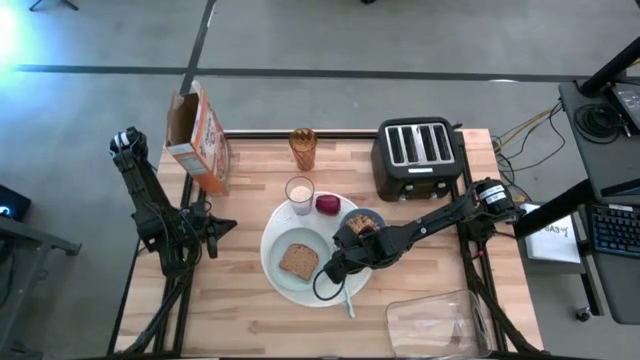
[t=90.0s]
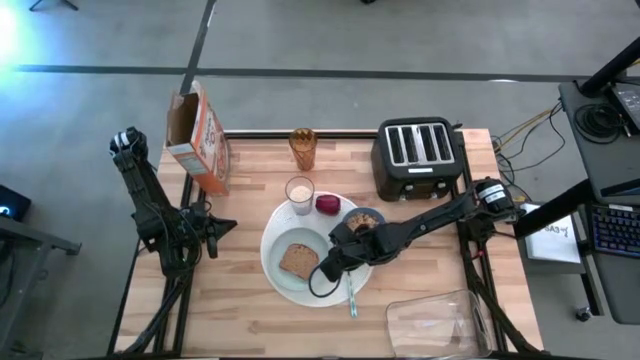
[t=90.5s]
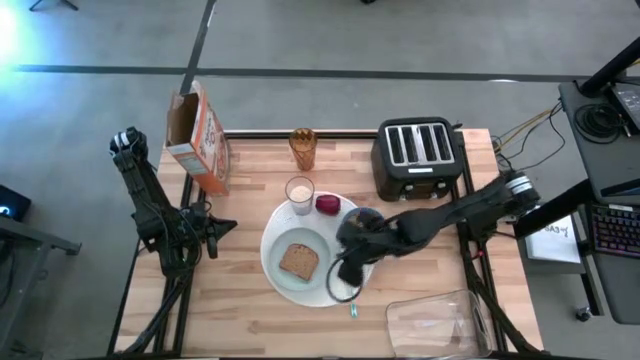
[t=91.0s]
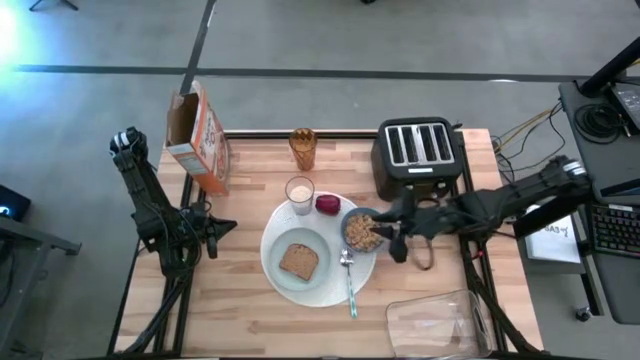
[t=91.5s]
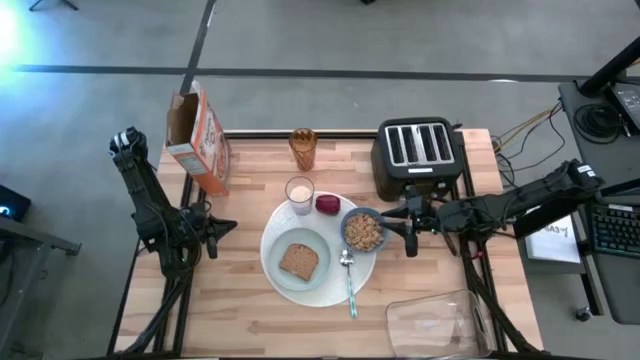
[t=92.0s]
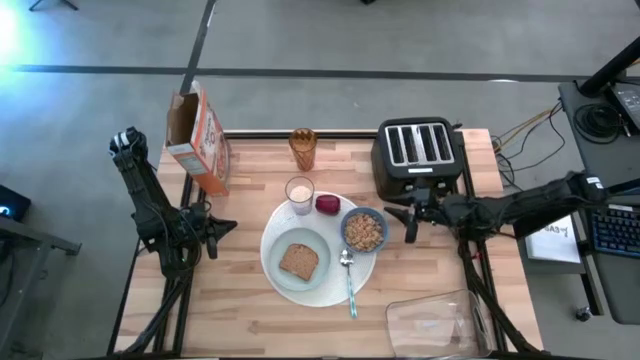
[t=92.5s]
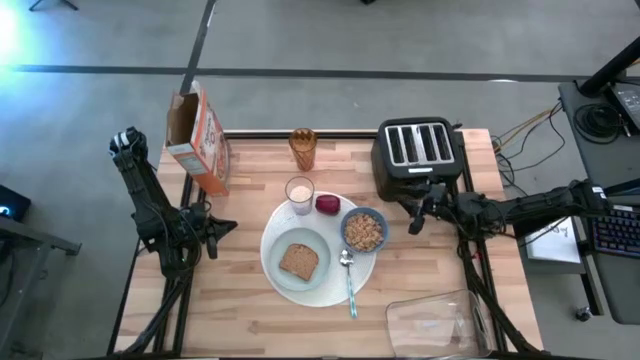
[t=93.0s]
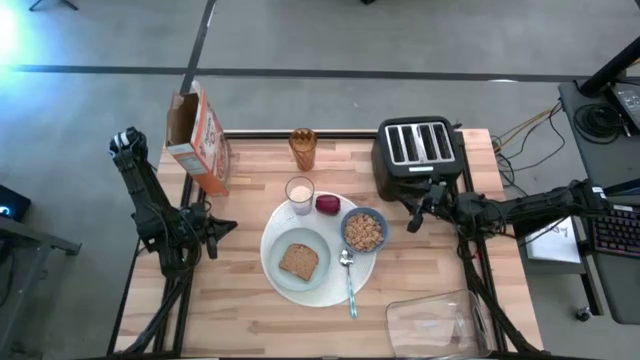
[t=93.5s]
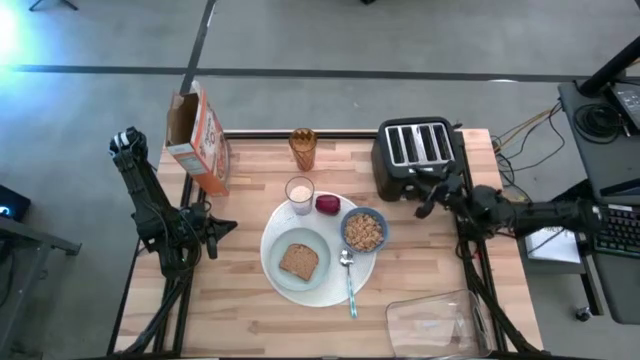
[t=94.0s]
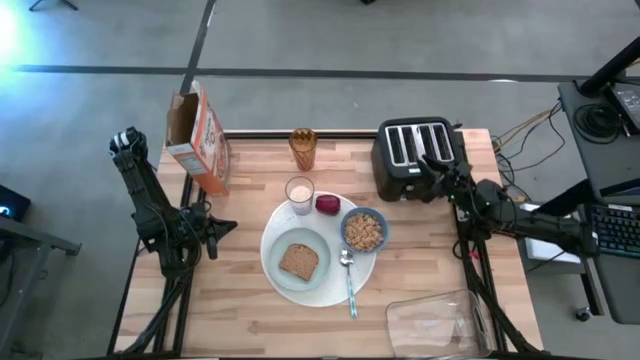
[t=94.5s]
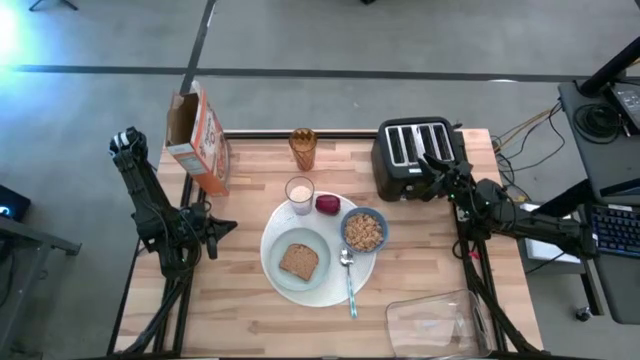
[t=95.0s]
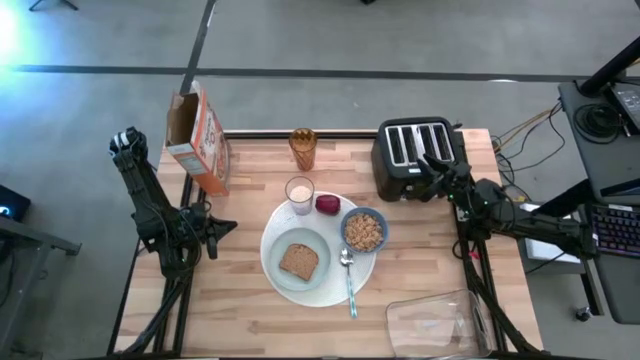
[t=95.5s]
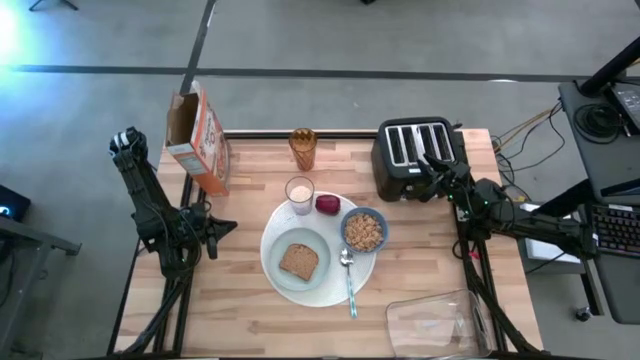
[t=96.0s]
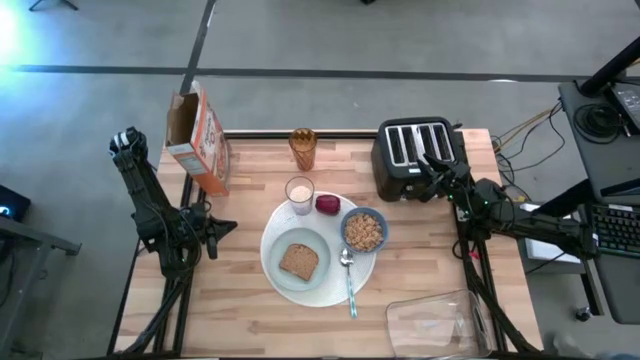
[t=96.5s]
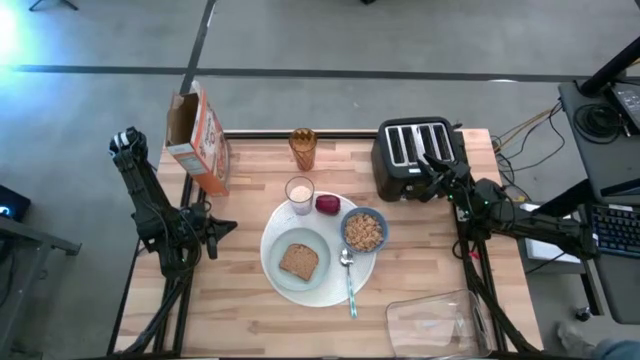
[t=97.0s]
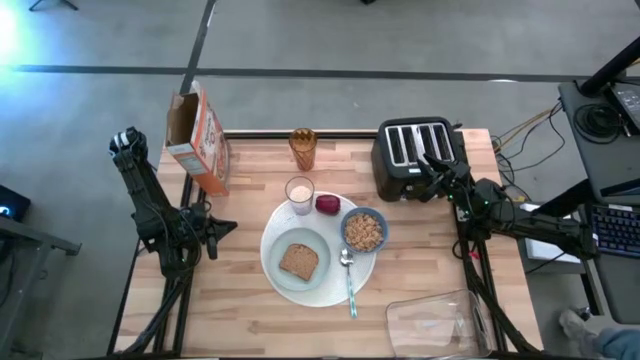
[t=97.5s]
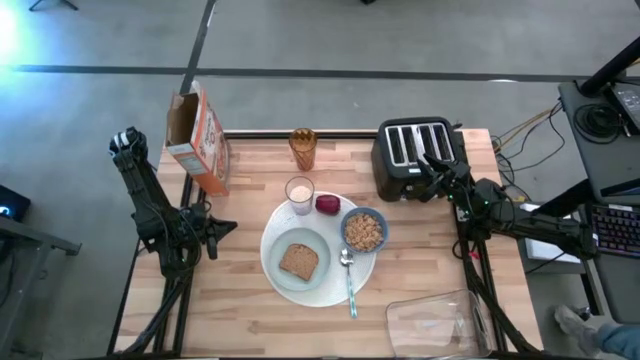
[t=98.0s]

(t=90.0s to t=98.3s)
Task: Arrange a breakfast setting
Return to Home Position

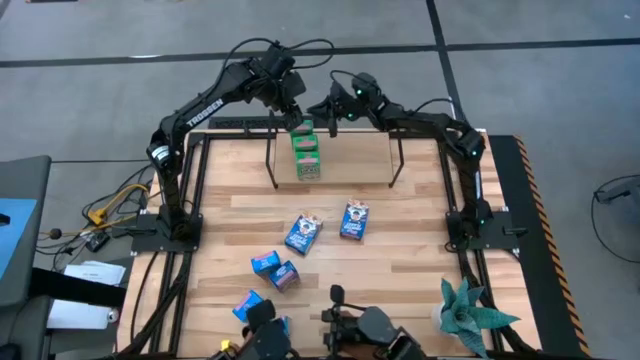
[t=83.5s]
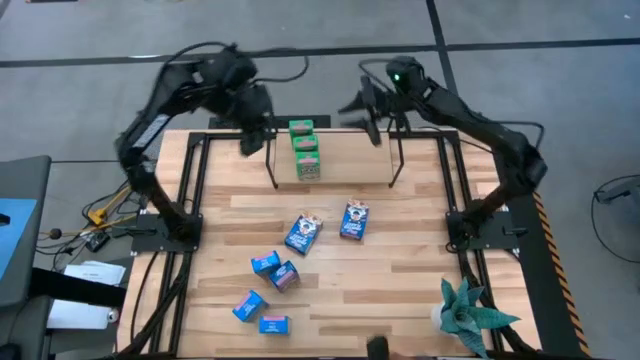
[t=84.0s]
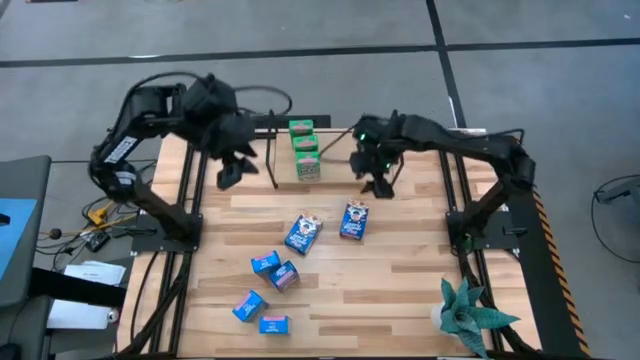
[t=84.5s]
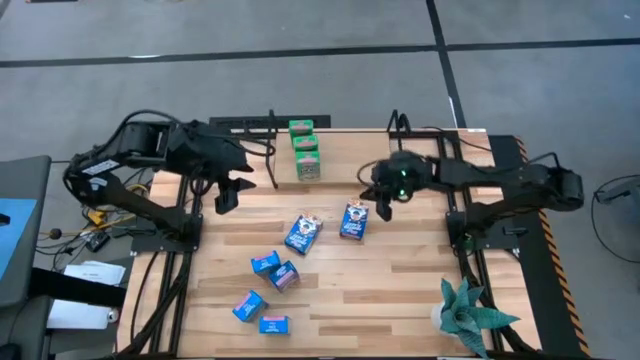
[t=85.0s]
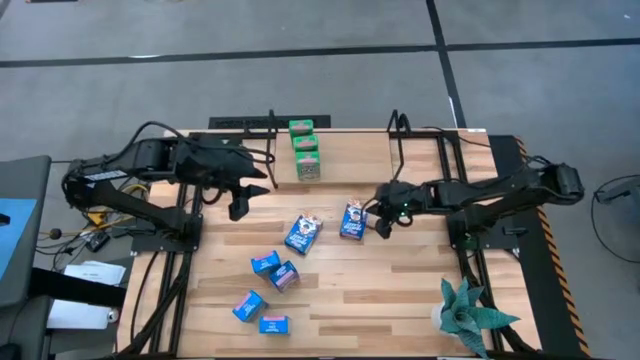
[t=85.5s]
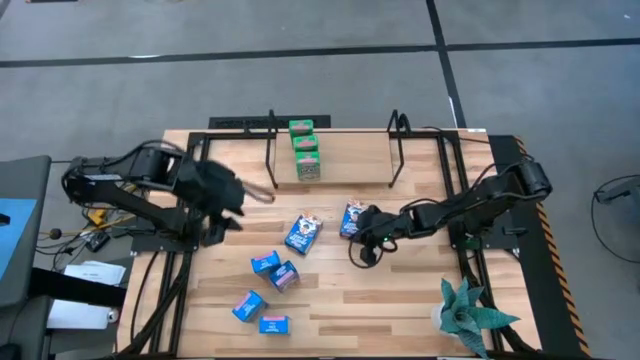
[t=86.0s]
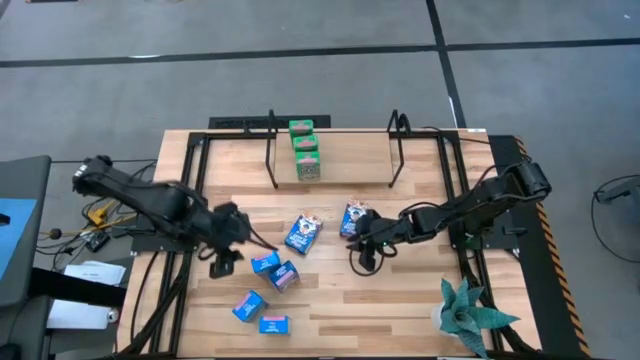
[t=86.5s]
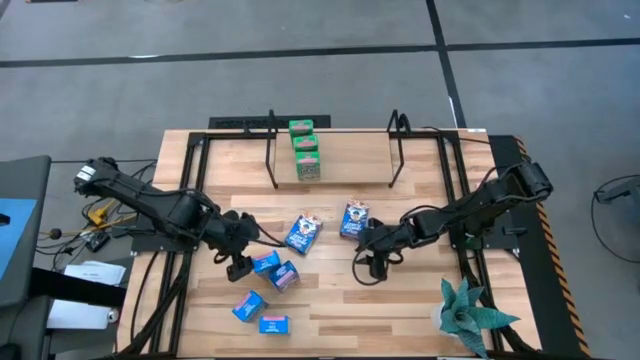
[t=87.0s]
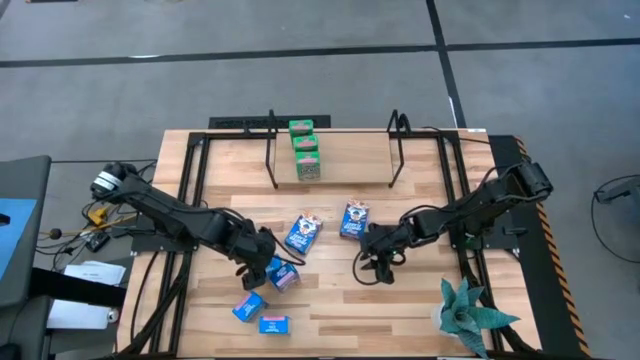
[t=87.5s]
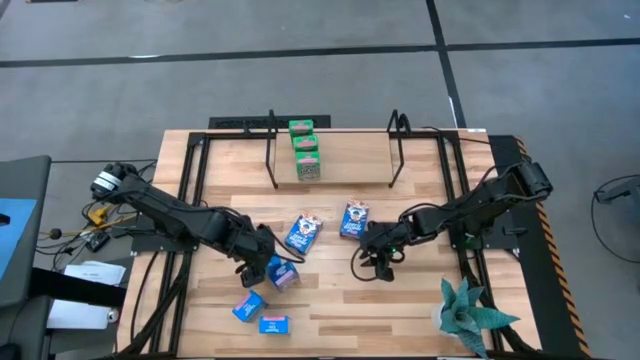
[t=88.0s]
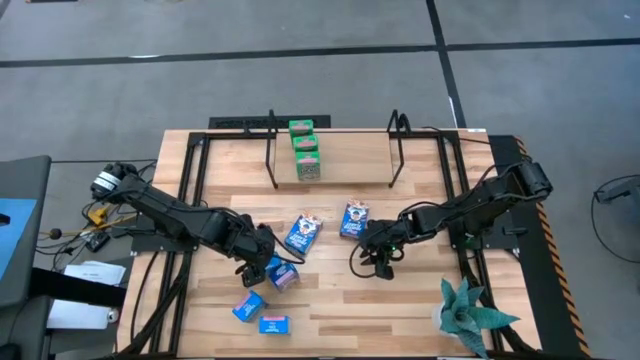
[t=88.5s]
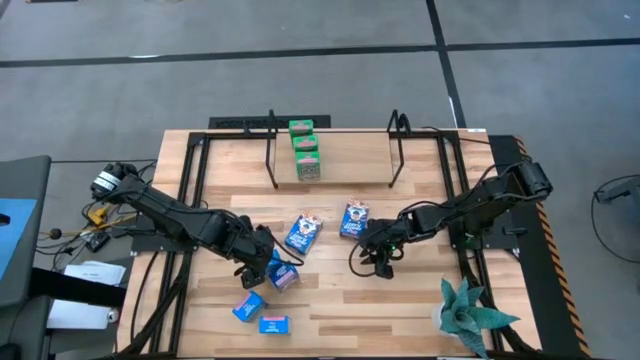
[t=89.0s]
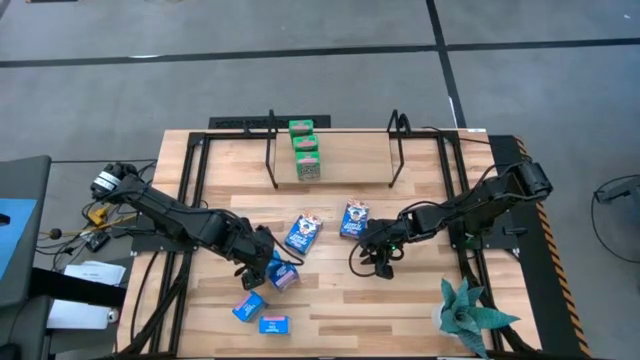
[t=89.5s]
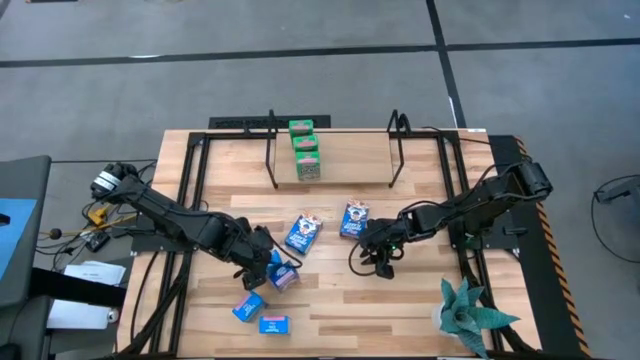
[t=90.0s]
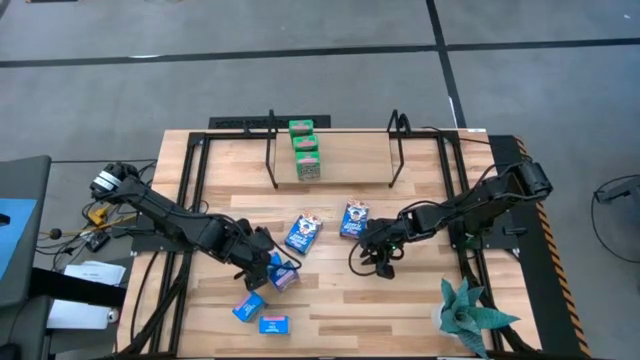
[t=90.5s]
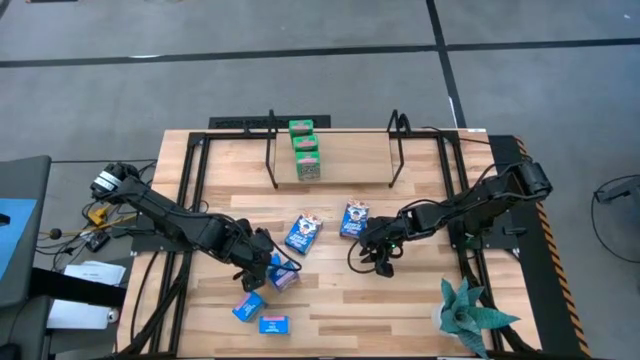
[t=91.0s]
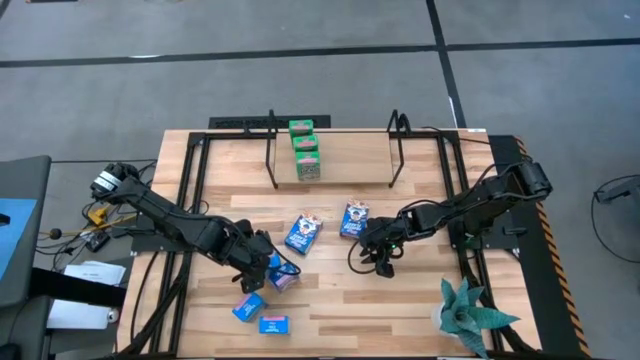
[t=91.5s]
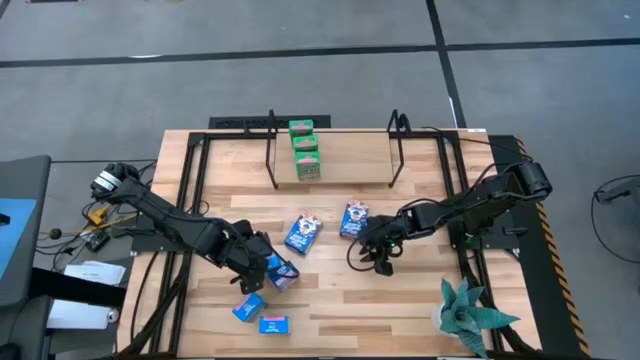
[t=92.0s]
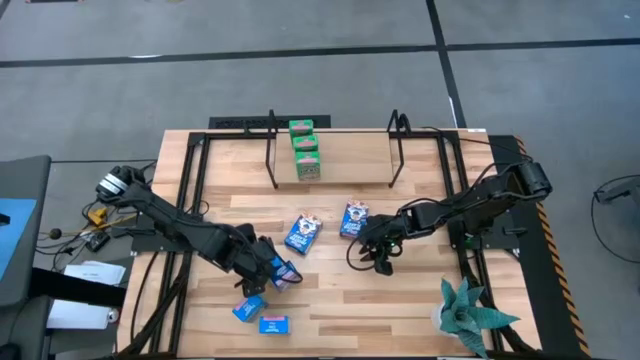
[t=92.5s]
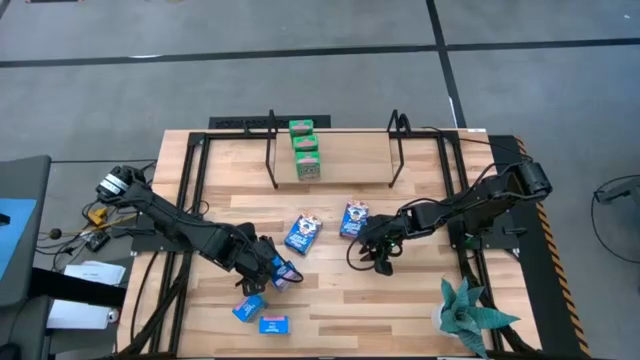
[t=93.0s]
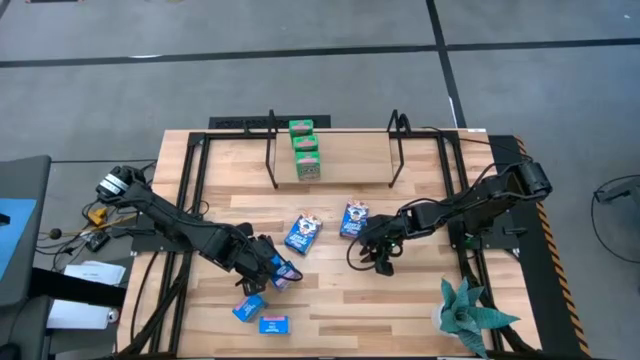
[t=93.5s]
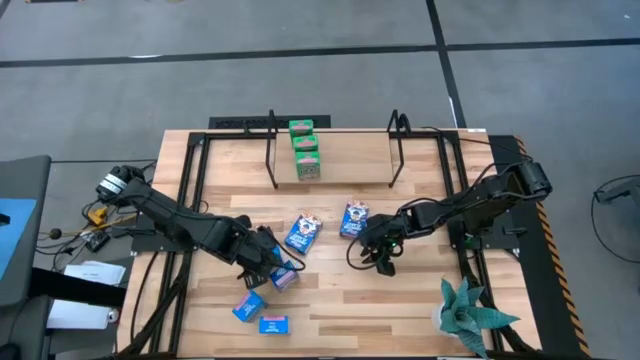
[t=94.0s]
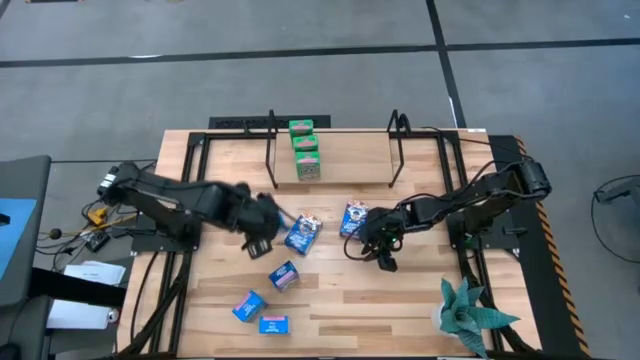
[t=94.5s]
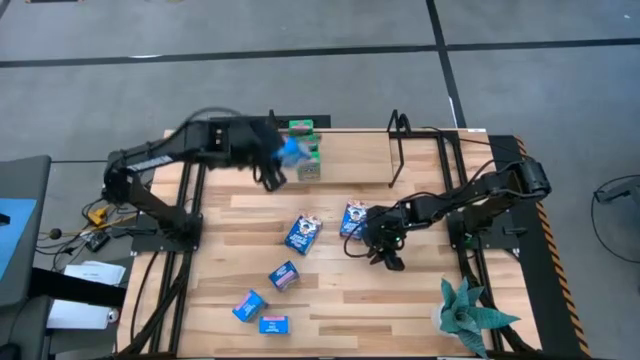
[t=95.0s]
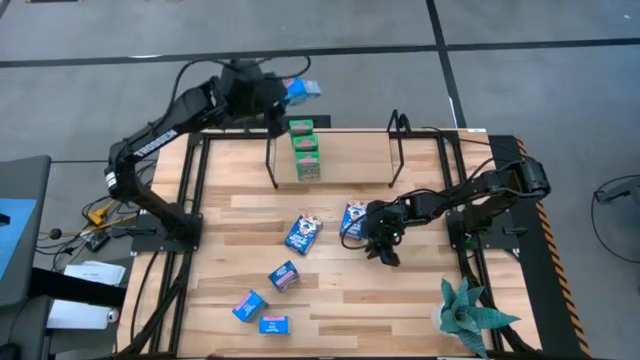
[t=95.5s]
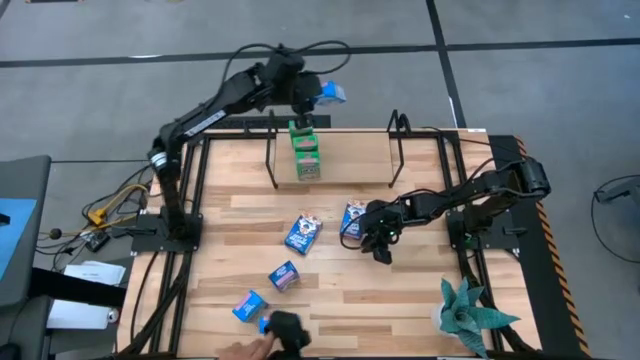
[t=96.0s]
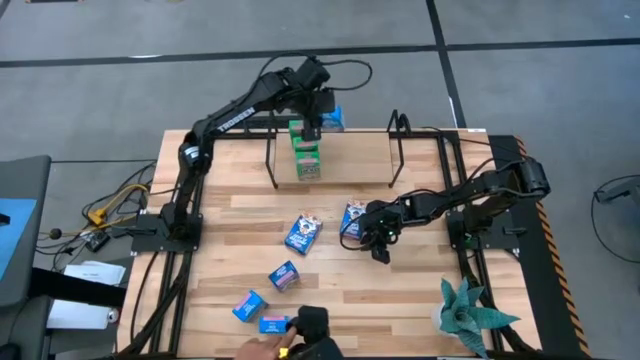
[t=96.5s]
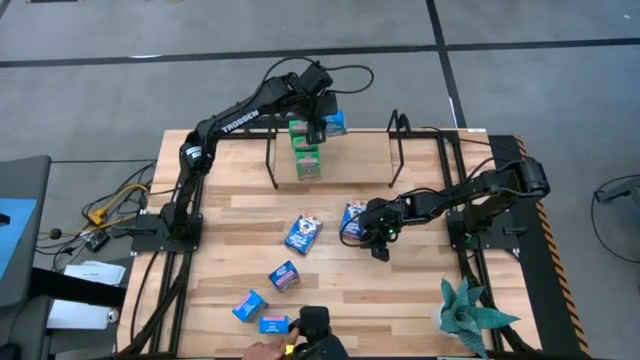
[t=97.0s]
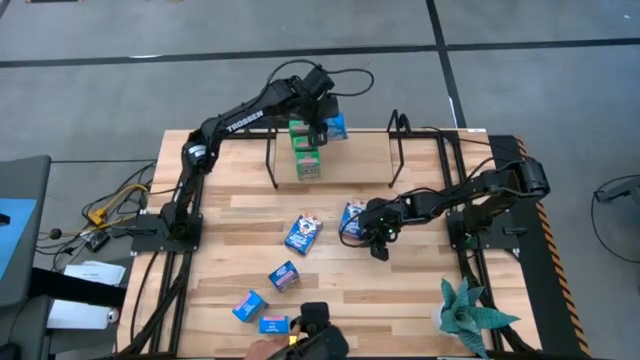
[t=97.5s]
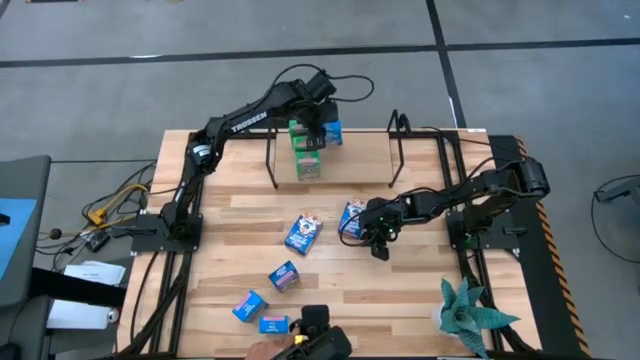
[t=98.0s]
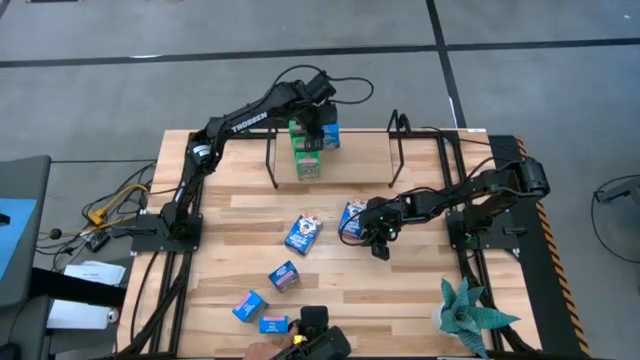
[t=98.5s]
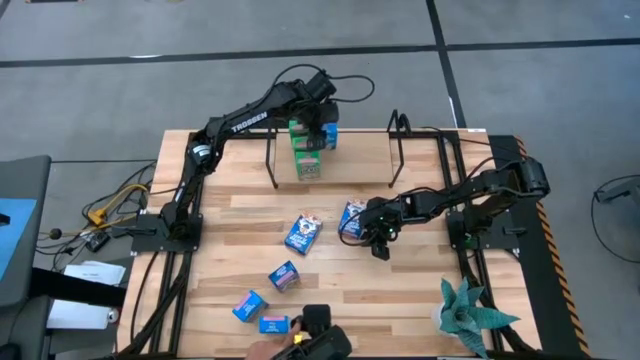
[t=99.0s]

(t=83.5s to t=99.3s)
Task: Stack cereal on shelf
Put the top light blue cereal box on the shelf aligned with the green cereal box
